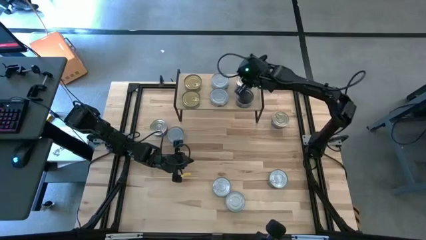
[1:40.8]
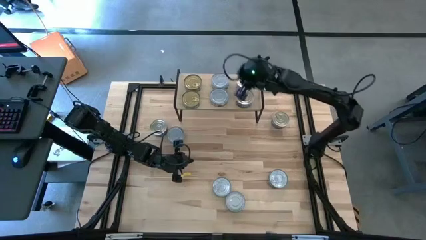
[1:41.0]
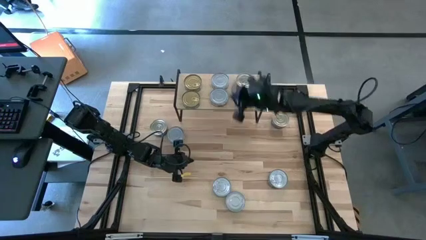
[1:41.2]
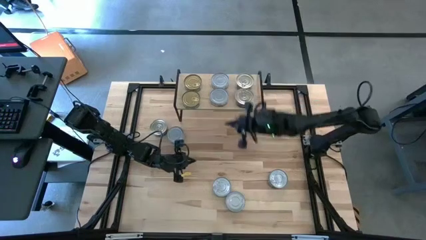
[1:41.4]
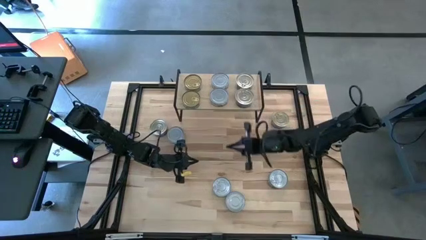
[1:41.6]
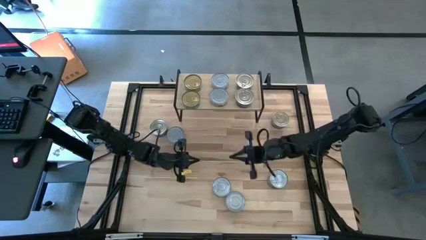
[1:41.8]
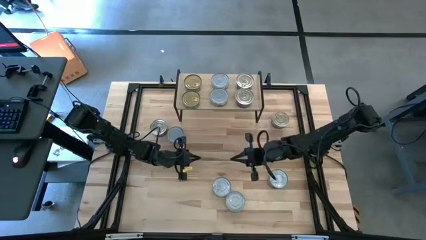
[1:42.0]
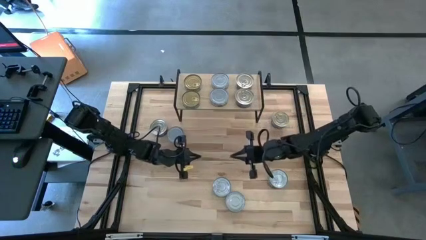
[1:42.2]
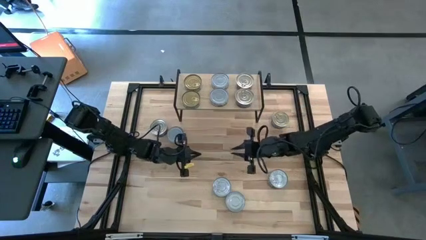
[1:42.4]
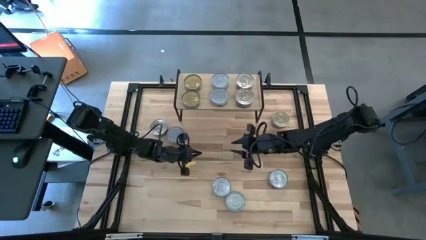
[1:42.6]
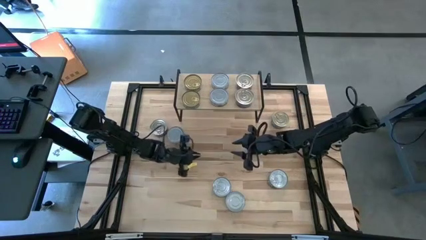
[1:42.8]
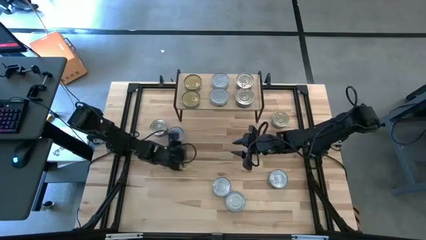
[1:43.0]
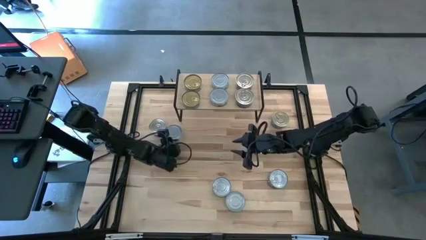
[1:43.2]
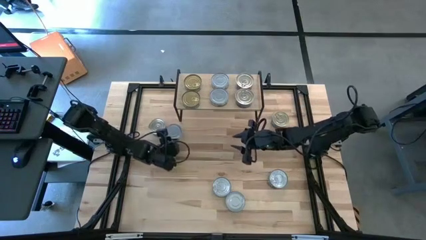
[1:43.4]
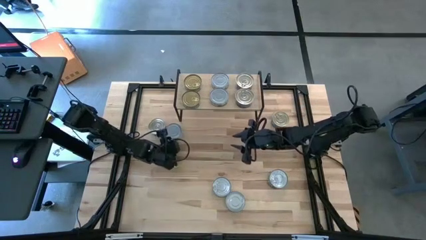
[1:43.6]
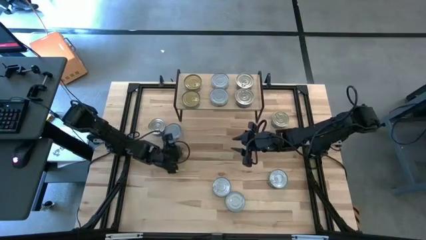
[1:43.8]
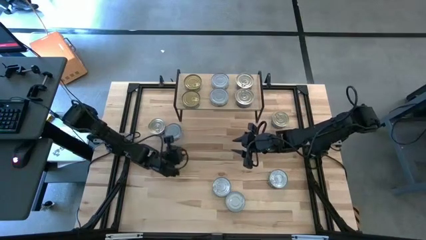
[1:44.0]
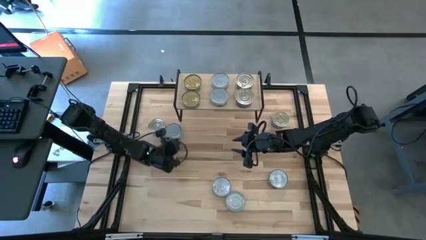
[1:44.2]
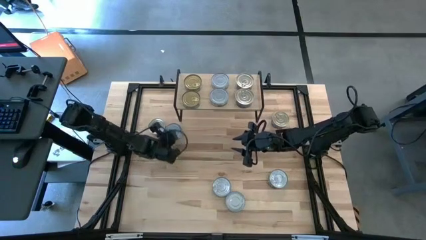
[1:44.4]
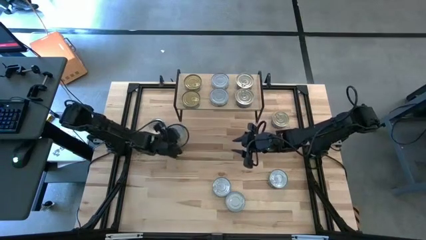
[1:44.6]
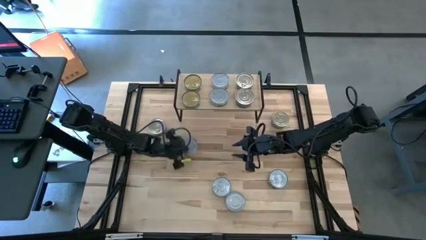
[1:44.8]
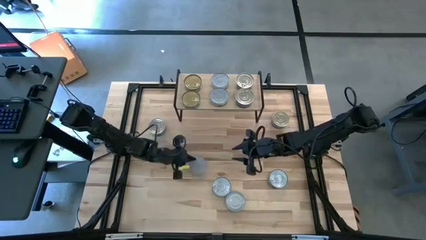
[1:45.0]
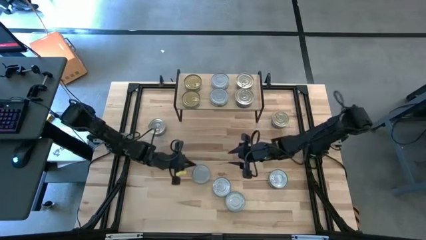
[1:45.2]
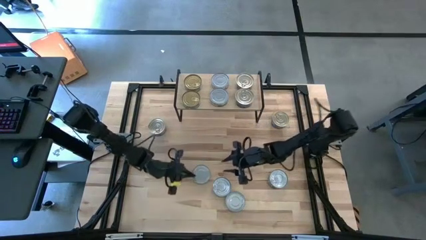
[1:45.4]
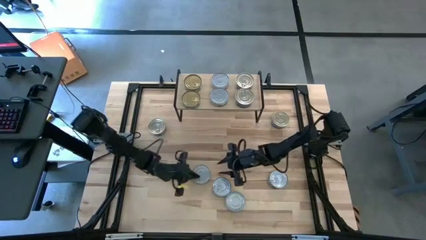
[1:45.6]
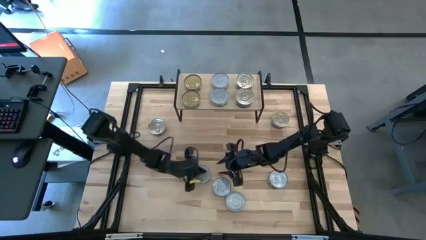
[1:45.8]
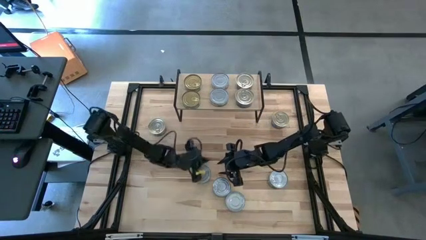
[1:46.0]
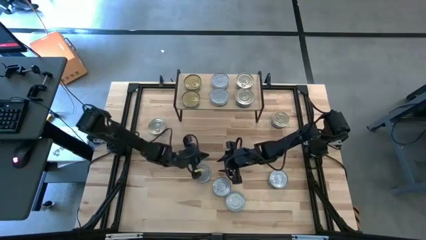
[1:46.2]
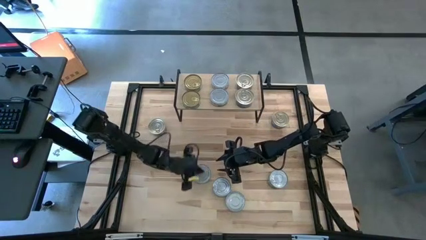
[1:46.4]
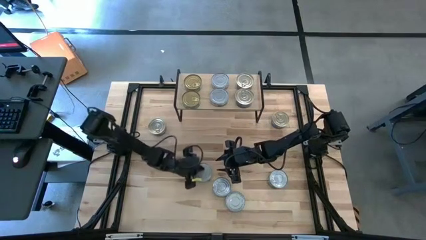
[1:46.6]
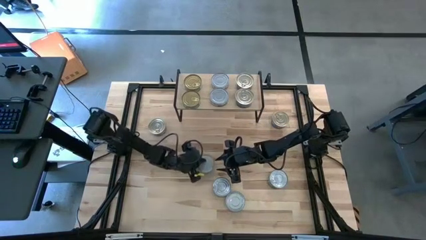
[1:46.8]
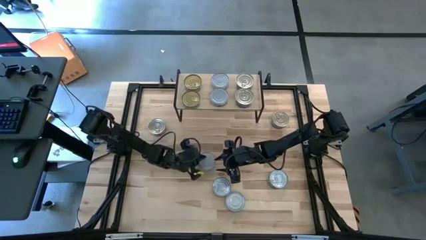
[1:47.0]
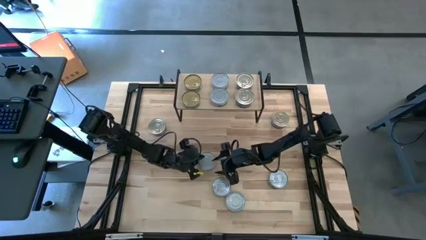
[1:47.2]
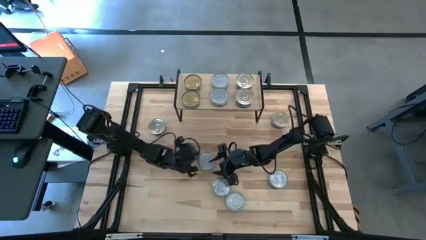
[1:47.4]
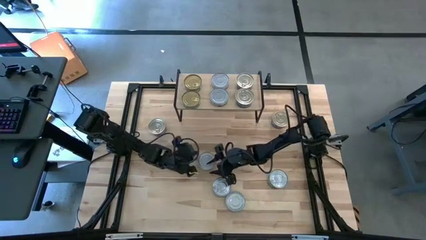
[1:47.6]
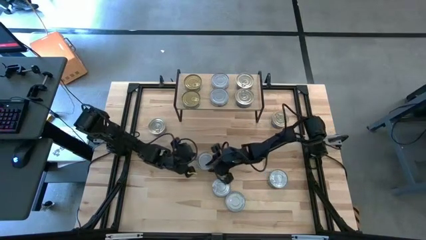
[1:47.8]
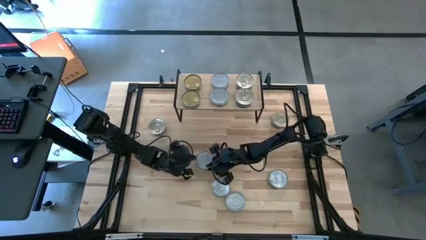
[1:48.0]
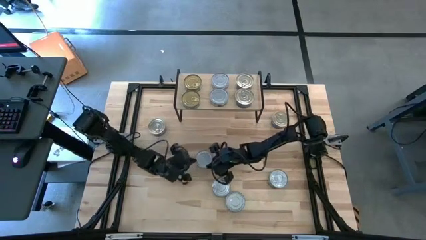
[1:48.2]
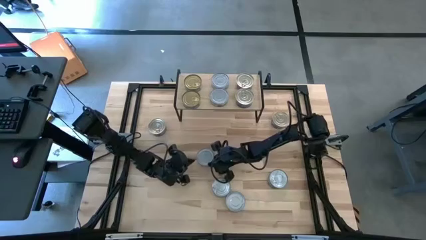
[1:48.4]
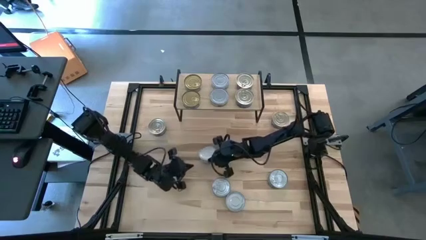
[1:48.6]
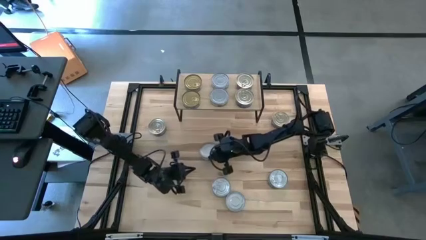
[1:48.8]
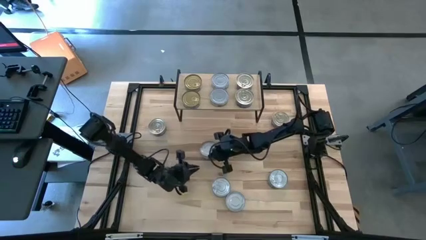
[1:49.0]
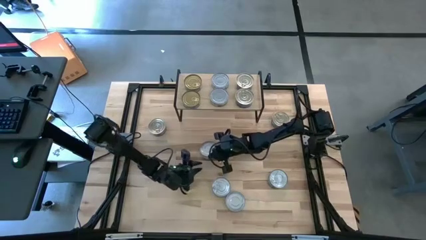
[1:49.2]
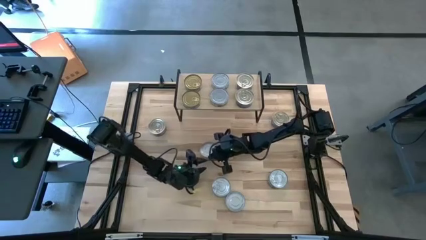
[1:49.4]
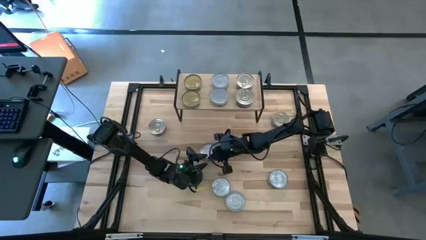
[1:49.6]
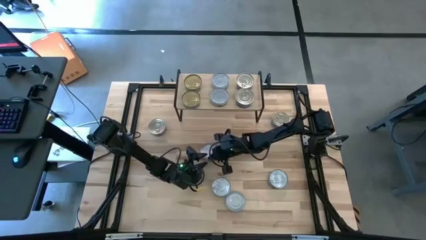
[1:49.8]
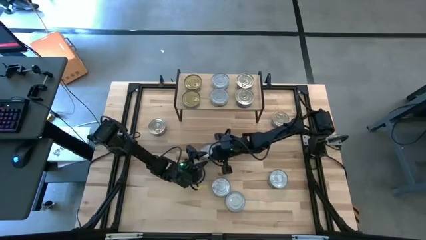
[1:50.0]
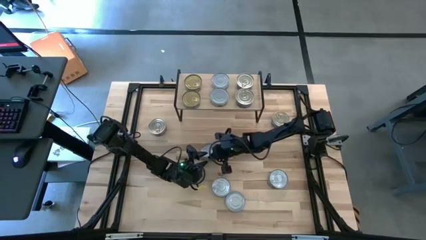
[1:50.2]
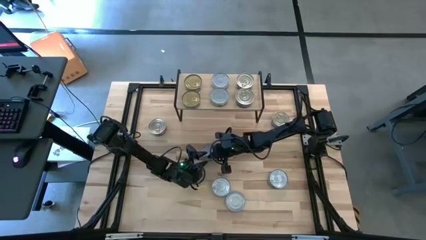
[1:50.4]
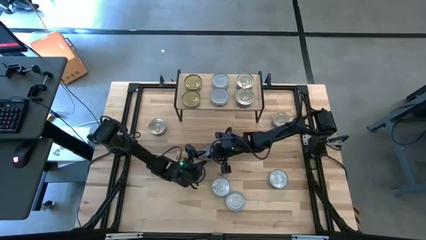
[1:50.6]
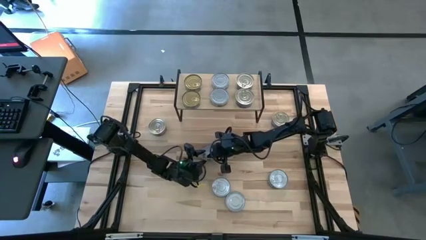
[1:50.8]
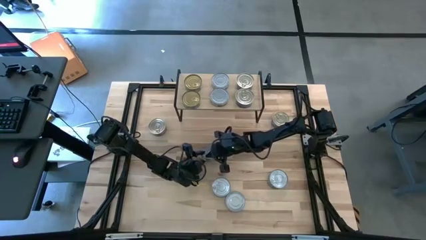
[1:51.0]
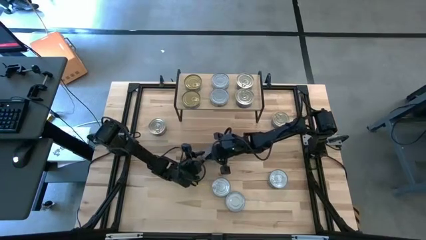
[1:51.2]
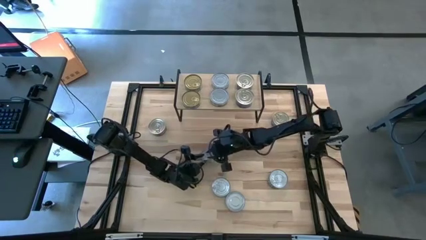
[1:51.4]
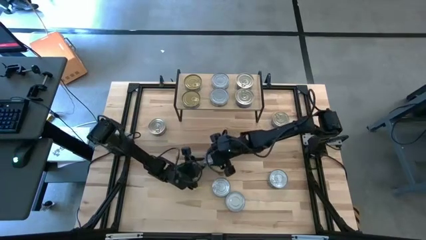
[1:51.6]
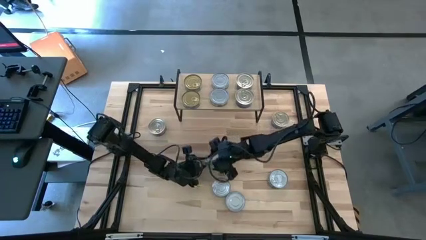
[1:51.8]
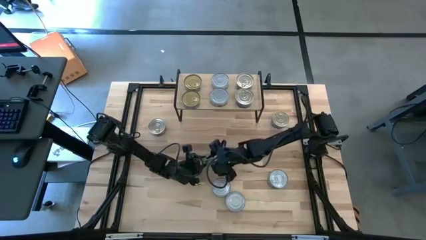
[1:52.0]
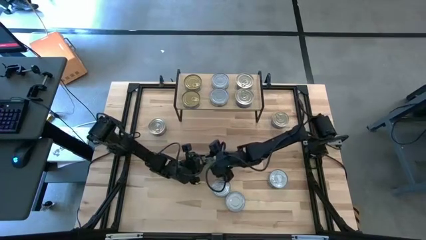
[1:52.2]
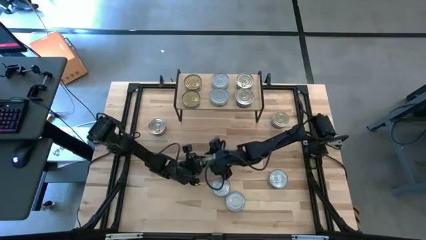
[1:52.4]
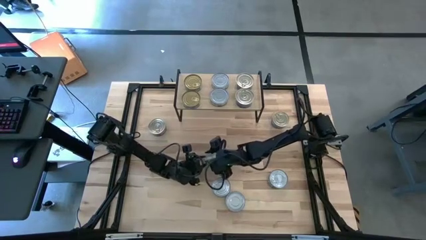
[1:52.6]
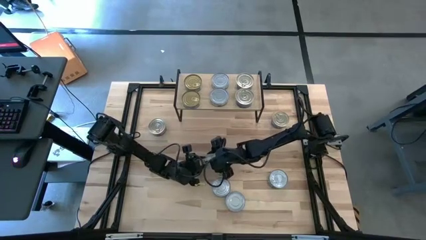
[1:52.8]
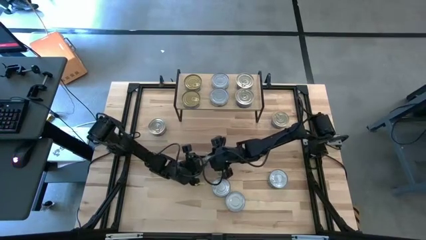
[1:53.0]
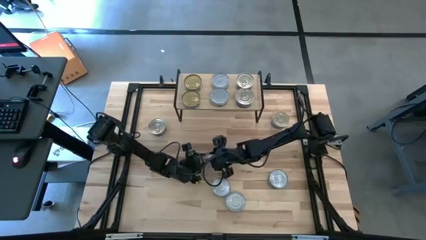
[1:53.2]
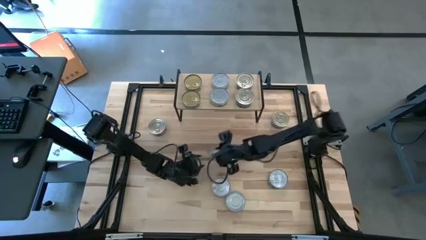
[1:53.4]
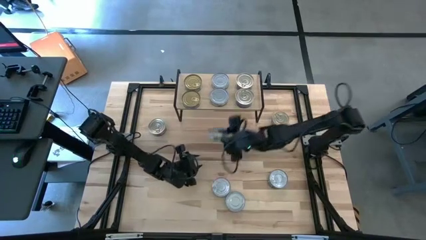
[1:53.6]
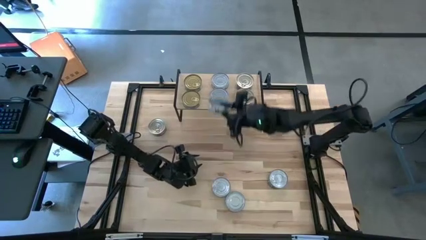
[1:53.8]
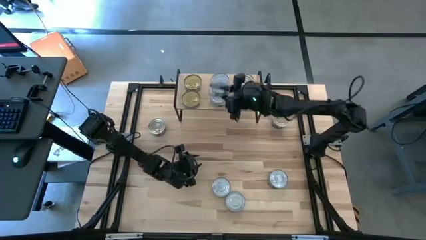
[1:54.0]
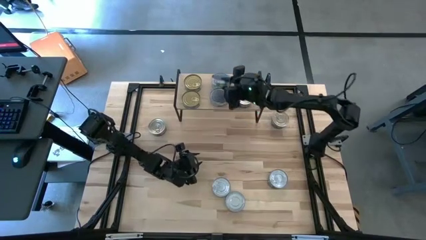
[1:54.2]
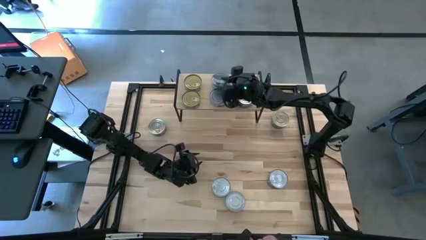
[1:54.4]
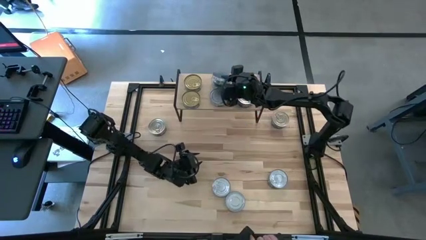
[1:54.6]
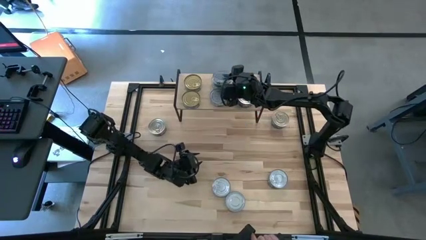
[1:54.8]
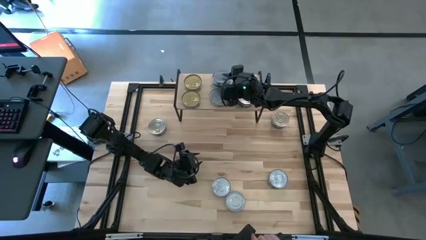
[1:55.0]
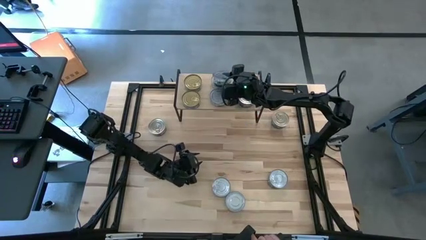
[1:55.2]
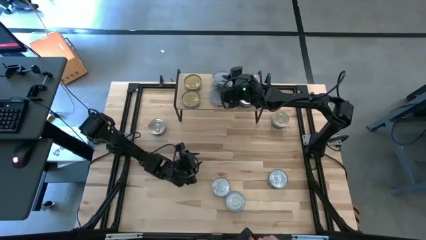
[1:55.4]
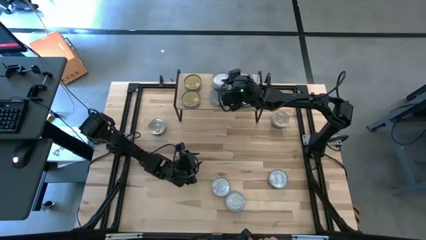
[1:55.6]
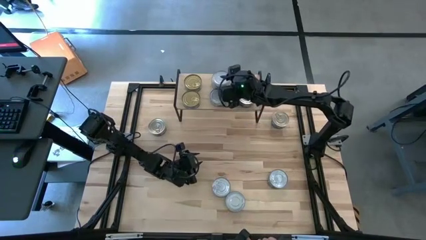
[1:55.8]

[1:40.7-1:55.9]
Task: Stack canned seafood by type on shelf
Stack the top light green tuna can on top of the top light green tuna can on the shelf
